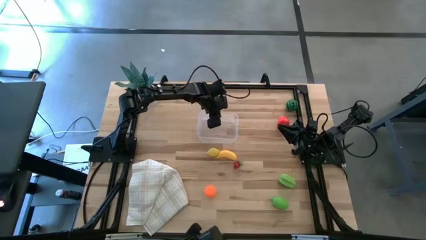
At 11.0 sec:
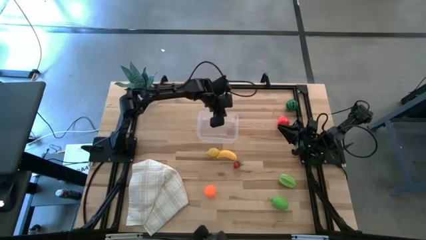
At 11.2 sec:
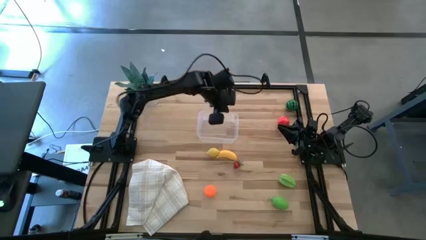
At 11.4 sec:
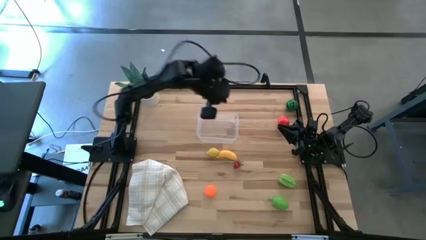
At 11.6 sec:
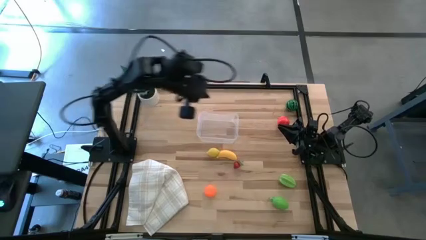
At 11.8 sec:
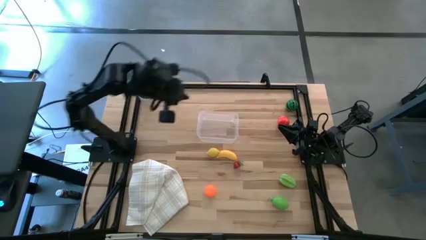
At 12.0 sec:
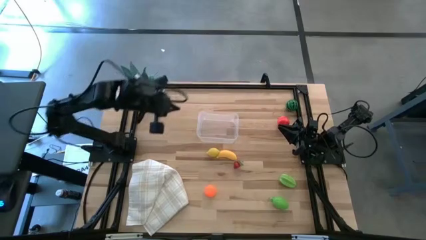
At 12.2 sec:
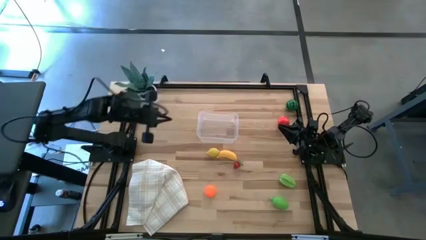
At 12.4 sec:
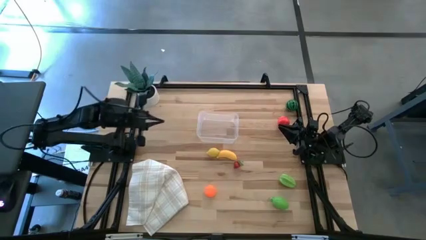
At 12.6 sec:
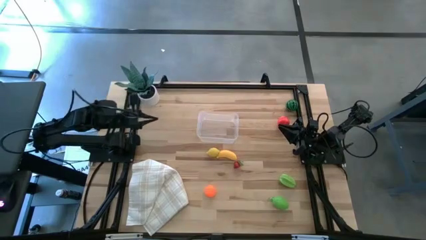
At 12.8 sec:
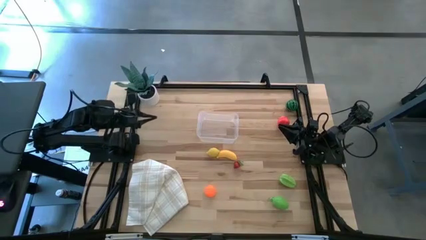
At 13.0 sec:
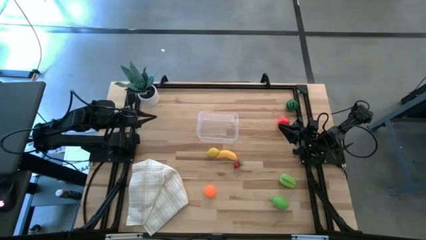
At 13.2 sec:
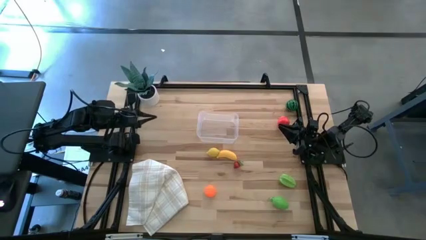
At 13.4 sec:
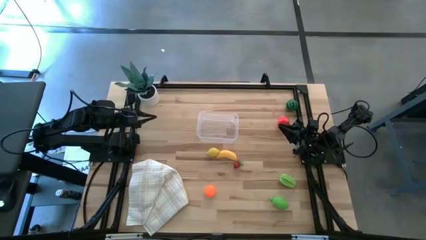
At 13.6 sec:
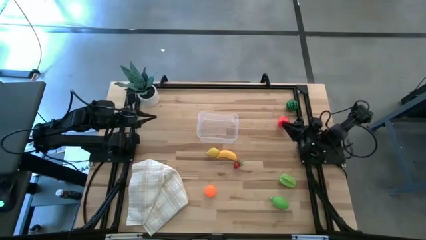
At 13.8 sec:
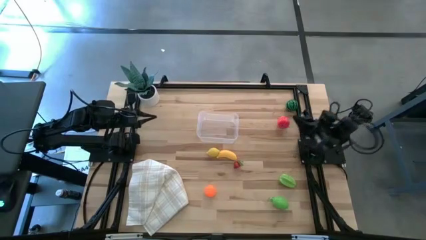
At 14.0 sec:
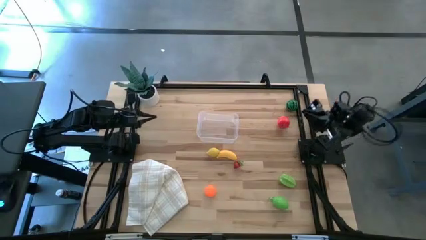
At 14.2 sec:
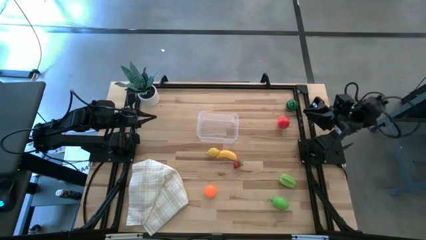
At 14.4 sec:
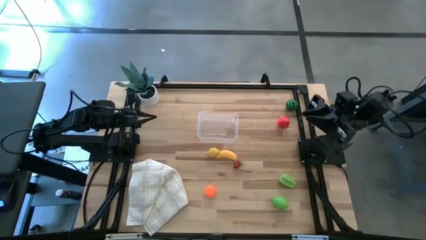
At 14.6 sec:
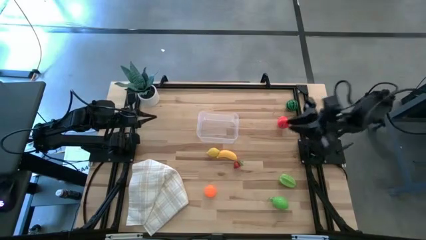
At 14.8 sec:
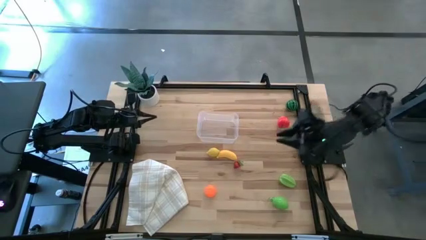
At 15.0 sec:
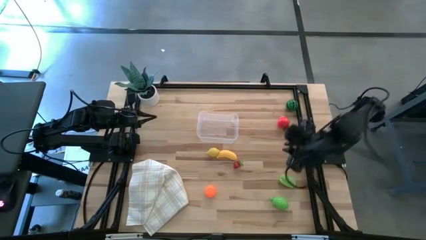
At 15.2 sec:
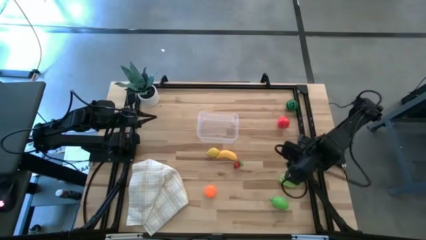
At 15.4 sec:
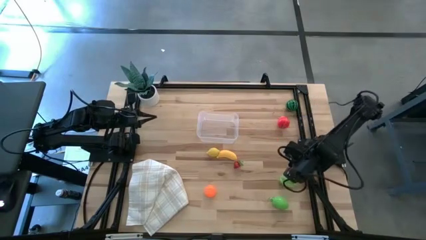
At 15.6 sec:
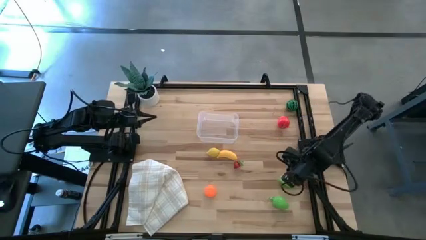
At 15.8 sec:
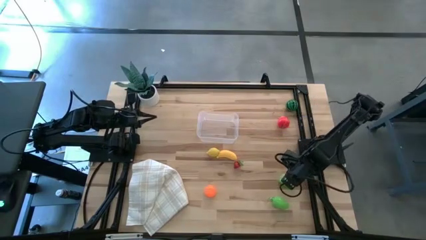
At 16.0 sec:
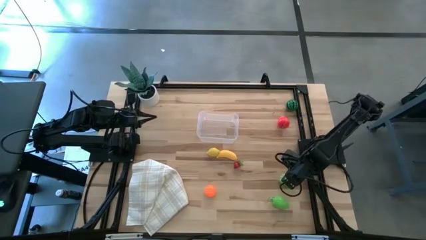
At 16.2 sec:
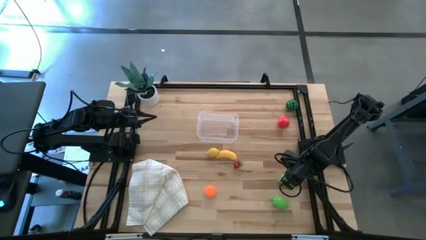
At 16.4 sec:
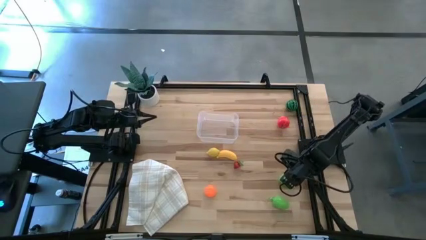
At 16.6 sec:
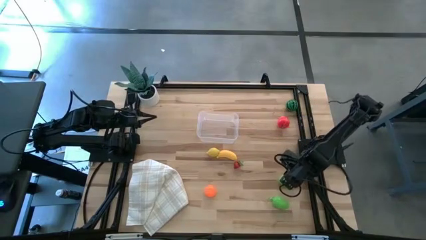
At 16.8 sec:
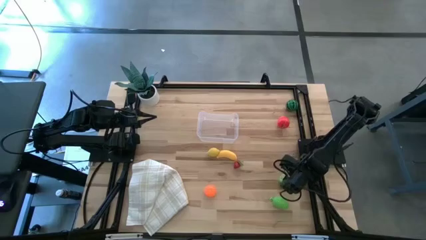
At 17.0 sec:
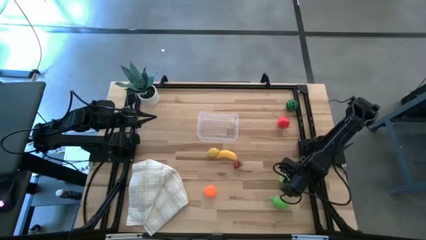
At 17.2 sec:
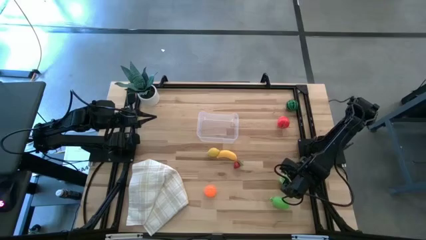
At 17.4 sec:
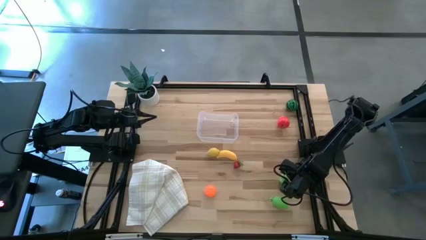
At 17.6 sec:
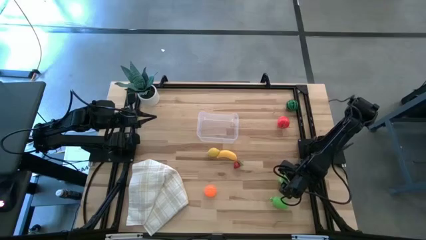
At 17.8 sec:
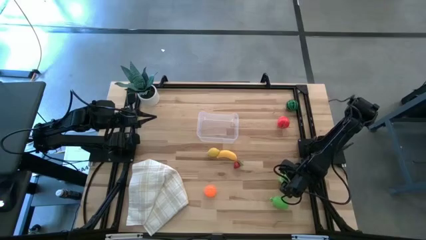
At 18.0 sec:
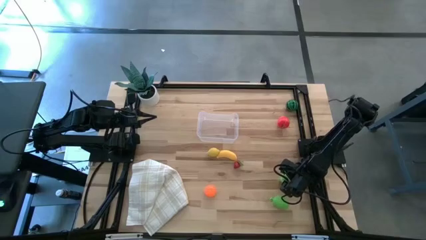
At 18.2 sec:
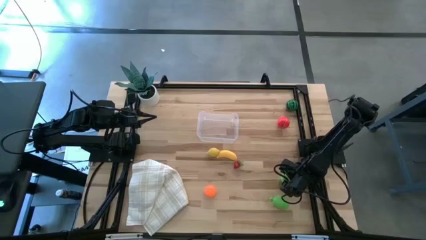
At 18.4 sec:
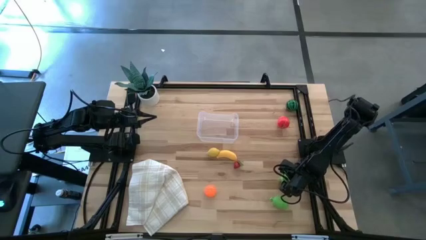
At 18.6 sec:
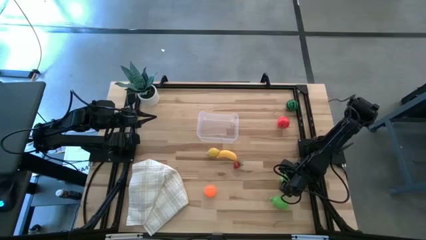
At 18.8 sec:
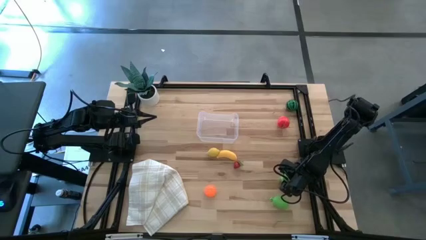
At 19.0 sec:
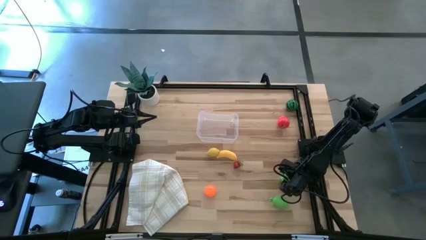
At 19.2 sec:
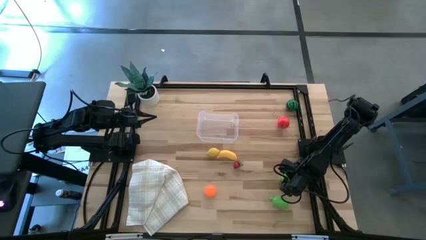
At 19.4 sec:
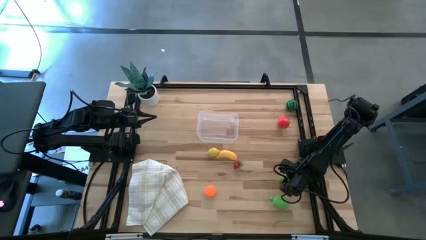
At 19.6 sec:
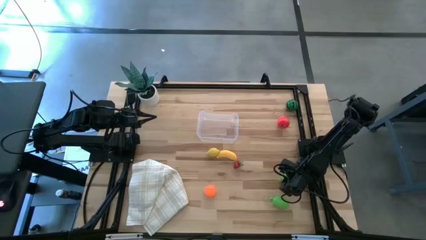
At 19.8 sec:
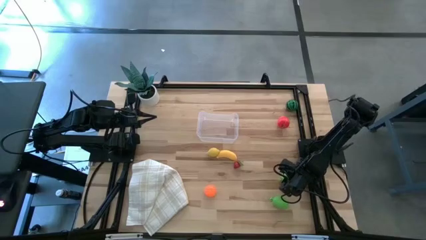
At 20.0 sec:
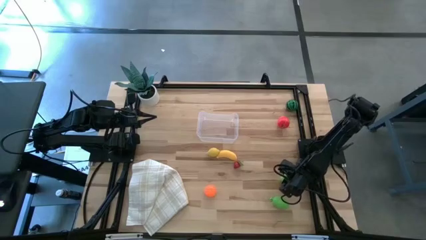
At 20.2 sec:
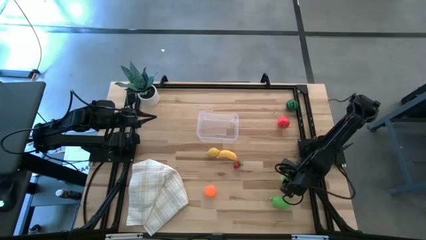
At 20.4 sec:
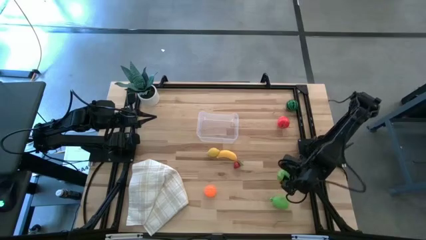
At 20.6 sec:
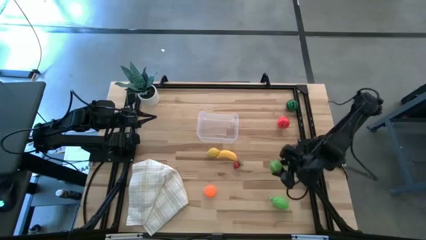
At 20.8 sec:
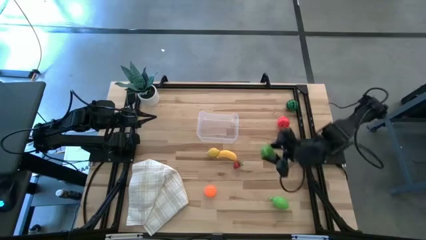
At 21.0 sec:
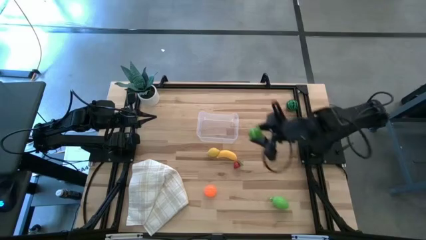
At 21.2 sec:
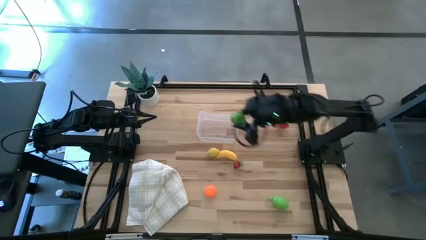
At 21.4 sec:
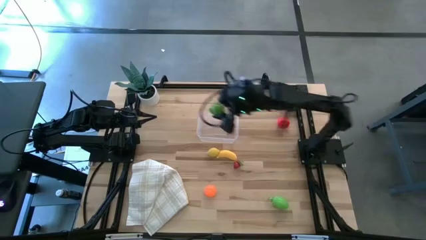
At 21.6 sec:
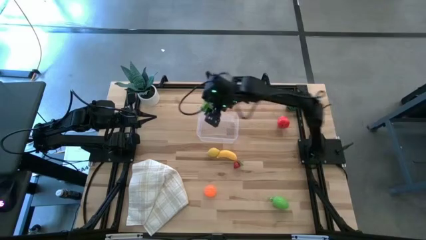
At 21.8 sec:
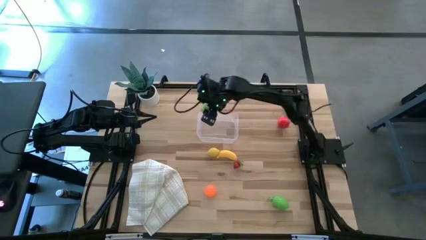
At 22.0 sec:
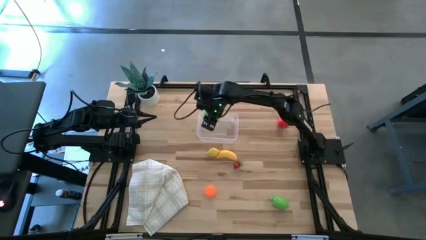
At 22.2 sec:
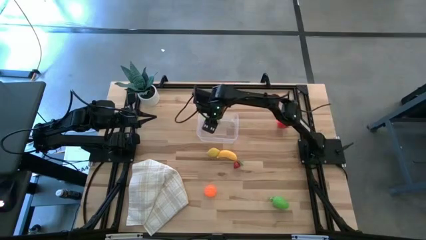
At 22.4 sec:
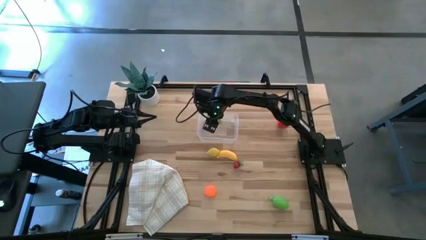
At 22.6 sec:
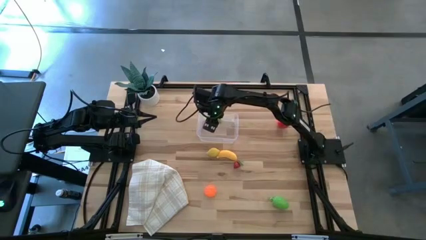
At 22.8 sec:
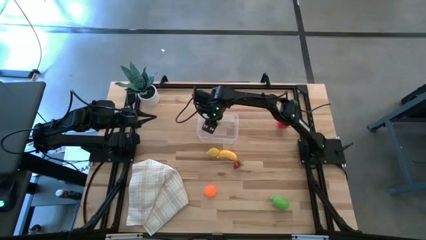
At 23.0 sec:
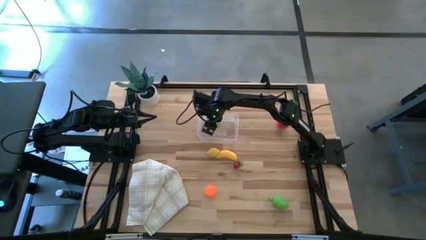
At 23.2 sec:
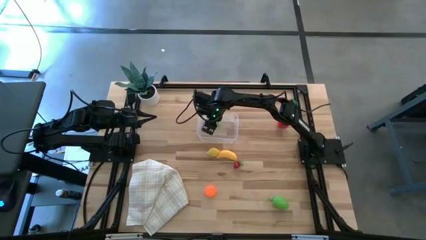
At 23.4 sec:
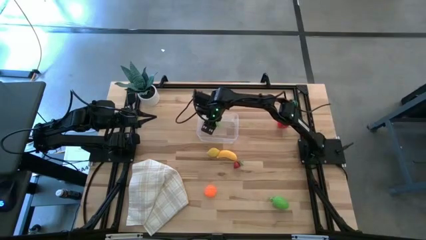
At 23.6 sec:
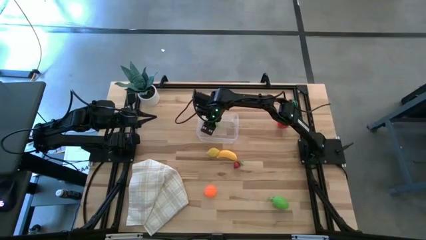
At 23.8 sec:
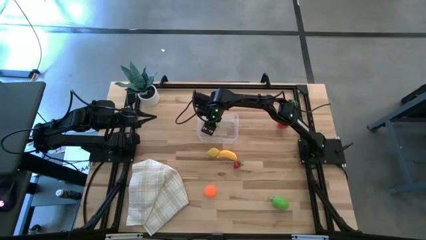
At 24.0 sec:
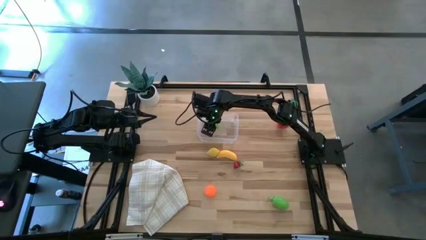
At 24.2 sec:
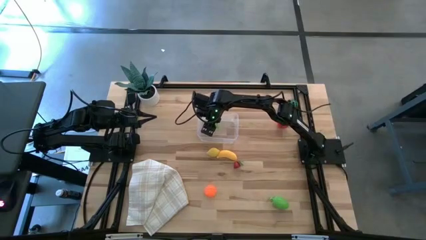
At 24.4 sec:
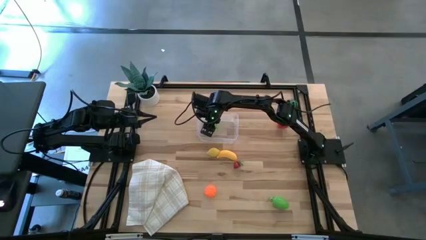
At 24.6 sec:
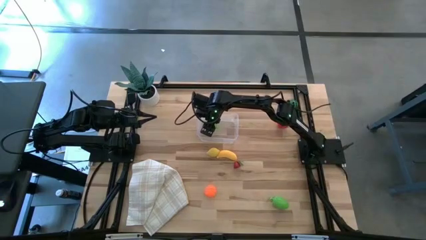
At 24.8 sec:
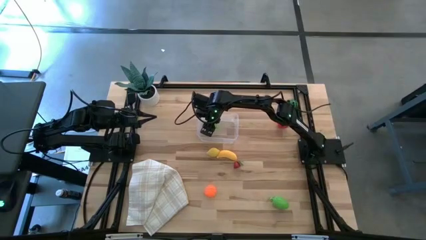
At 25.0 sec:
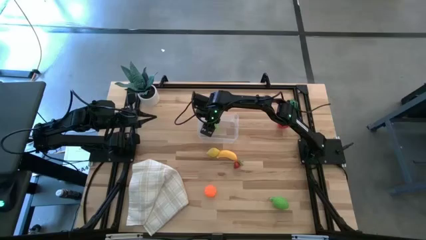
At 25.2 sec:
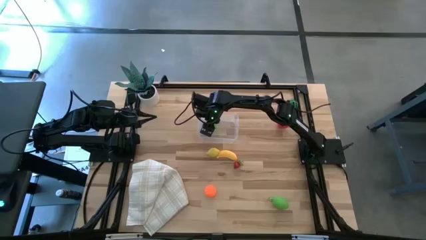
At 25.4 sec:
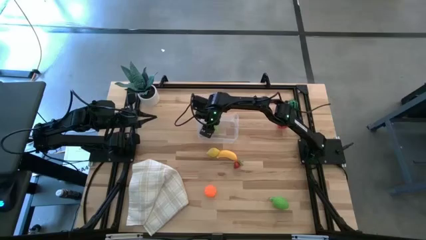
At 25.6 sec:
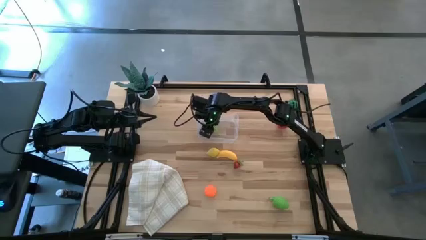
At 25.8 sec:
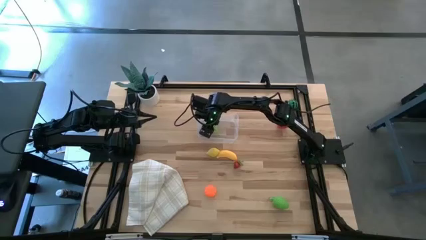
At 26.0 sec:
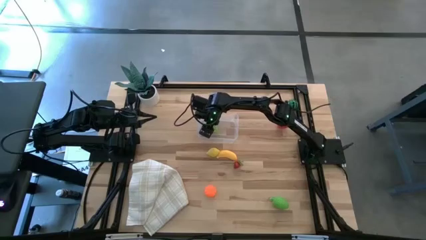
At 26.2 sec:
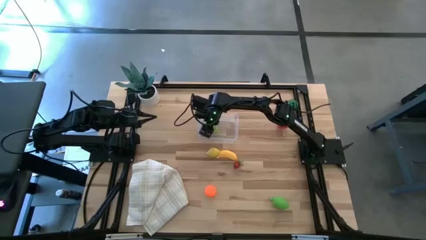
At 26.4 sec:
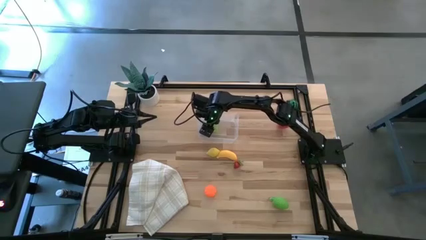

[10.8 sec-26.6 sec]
Task: Pick and placing Produce into tupperware
Put the starfruit into the transparent bin
